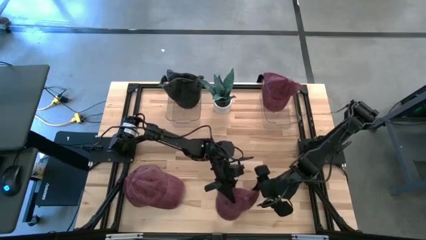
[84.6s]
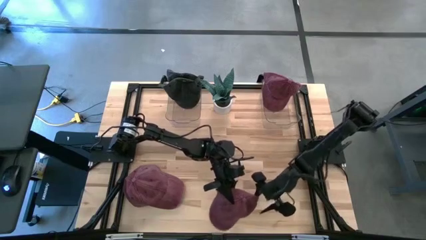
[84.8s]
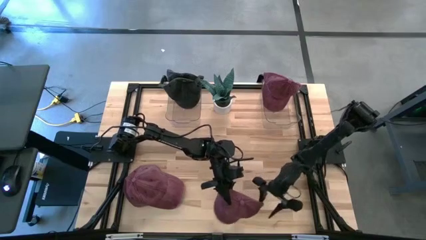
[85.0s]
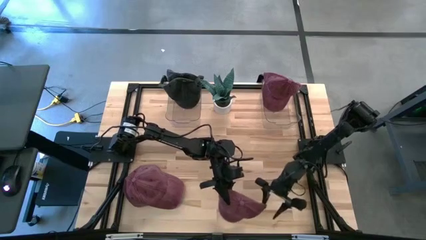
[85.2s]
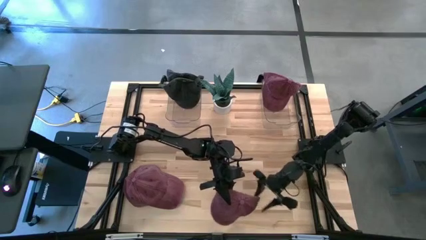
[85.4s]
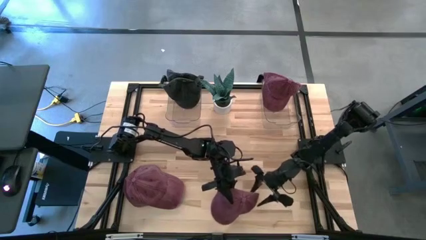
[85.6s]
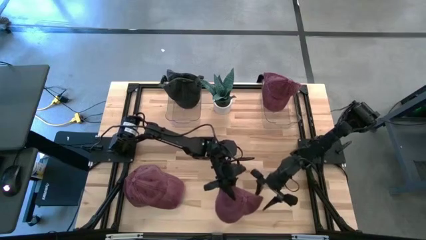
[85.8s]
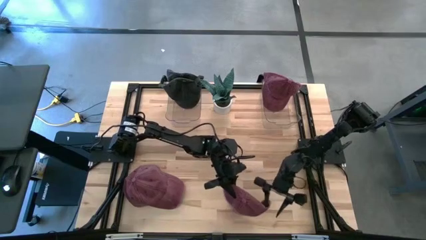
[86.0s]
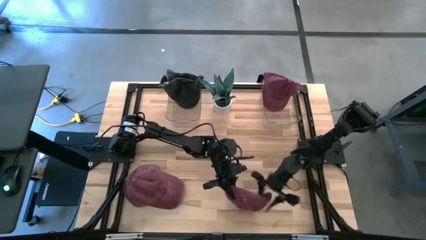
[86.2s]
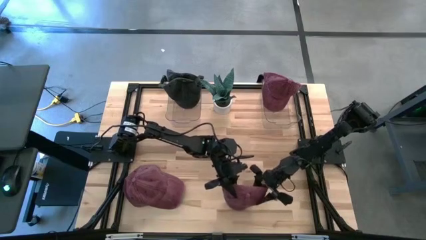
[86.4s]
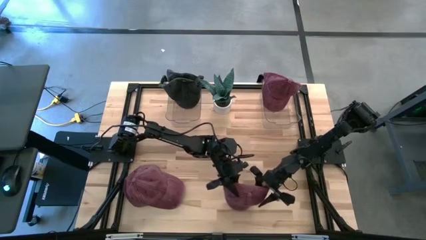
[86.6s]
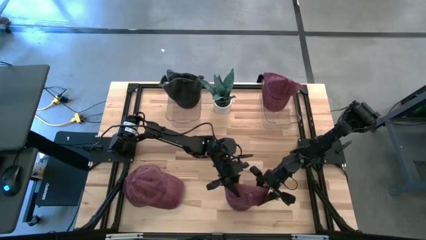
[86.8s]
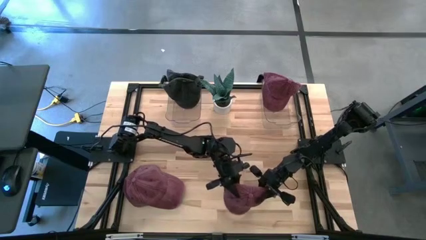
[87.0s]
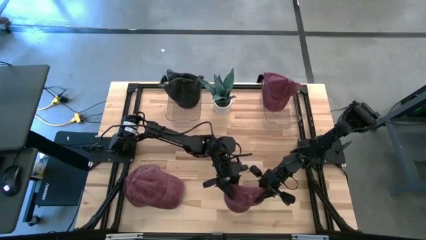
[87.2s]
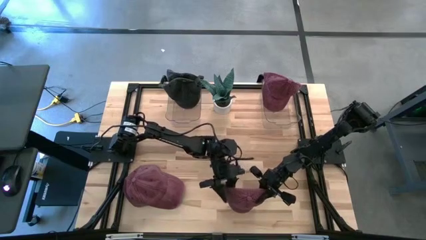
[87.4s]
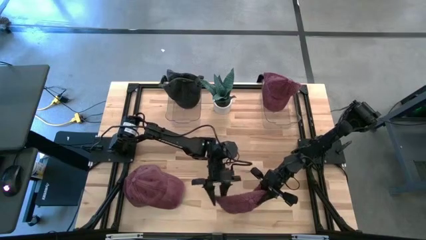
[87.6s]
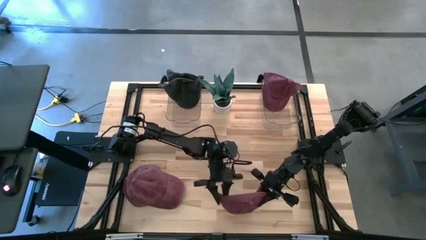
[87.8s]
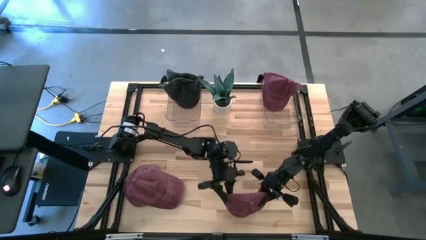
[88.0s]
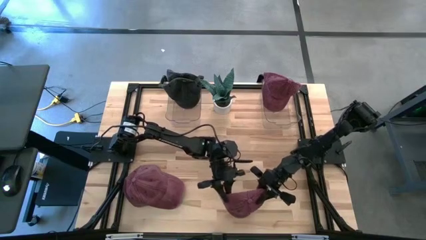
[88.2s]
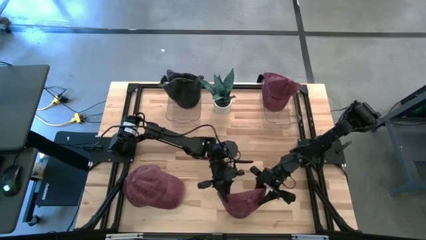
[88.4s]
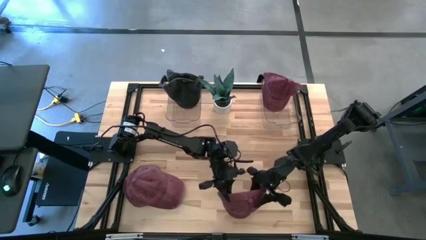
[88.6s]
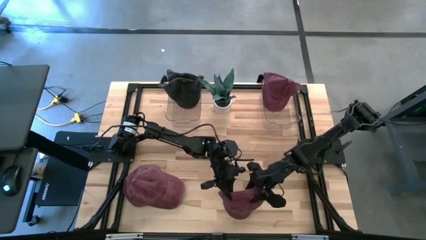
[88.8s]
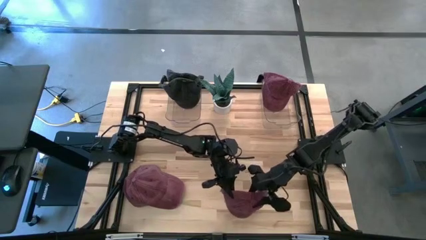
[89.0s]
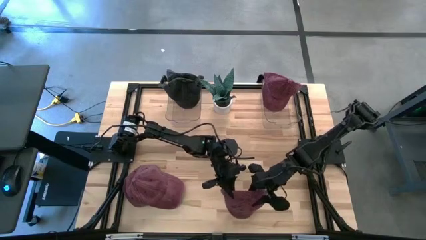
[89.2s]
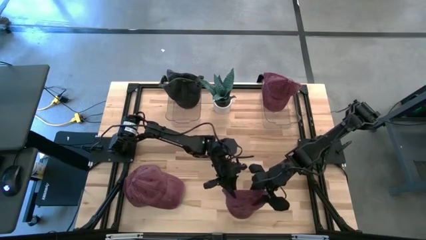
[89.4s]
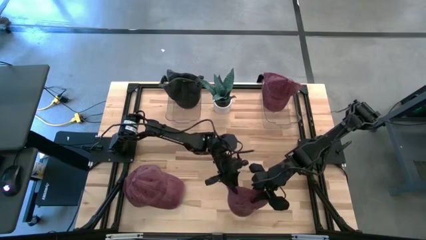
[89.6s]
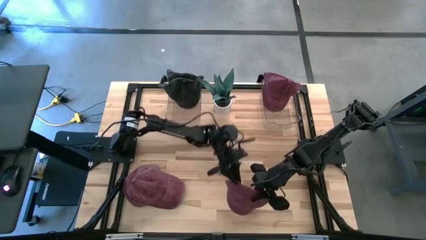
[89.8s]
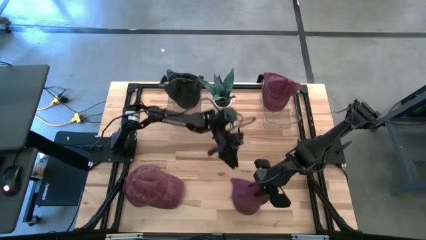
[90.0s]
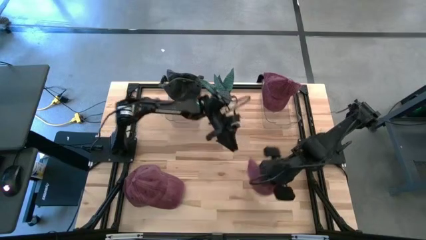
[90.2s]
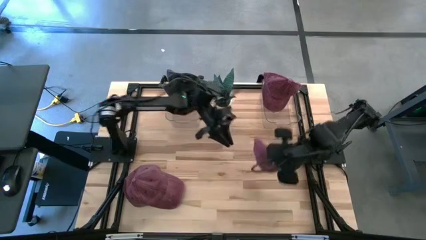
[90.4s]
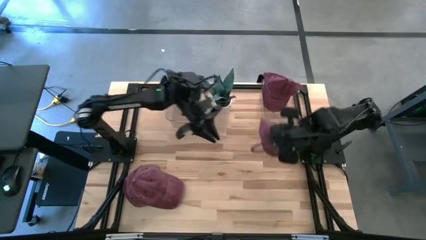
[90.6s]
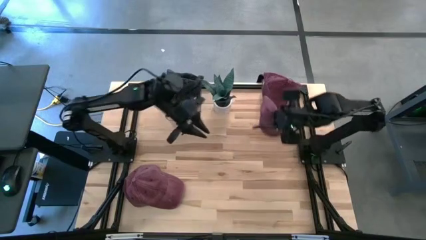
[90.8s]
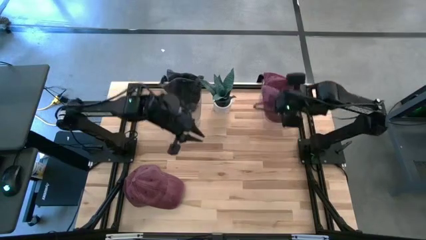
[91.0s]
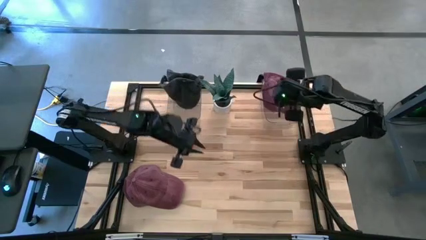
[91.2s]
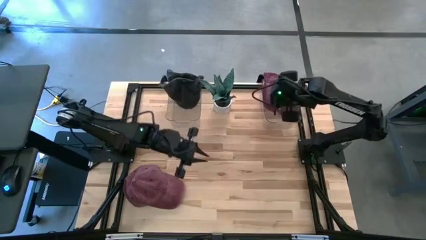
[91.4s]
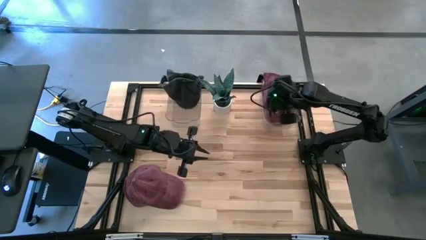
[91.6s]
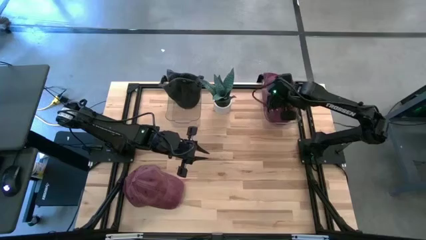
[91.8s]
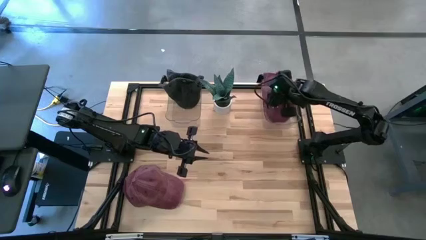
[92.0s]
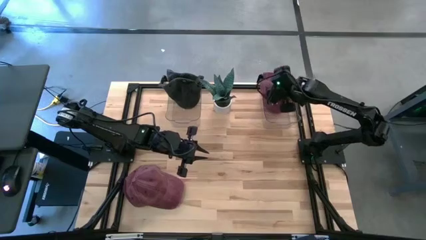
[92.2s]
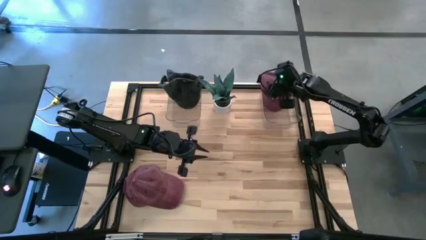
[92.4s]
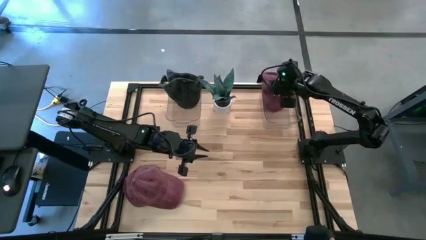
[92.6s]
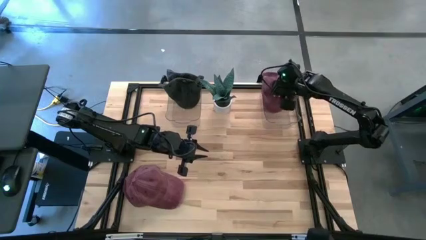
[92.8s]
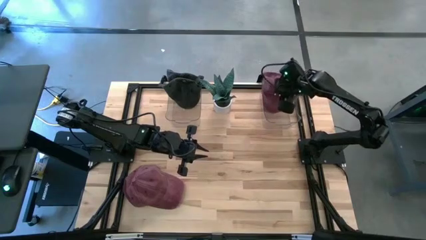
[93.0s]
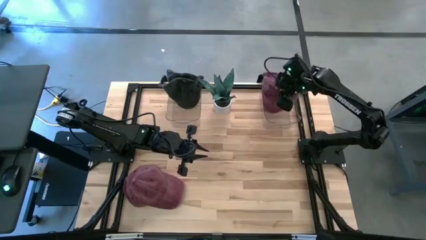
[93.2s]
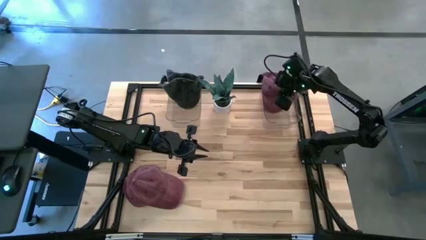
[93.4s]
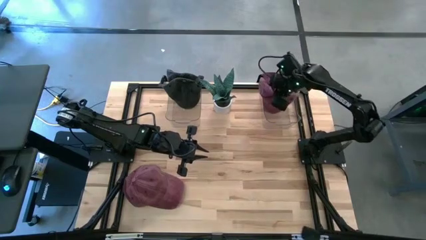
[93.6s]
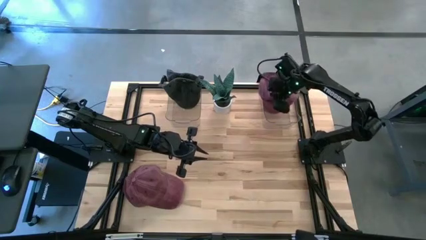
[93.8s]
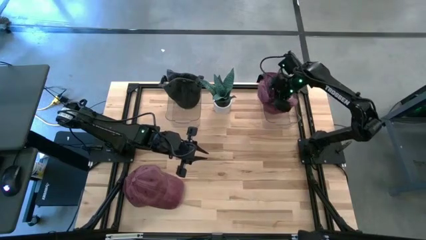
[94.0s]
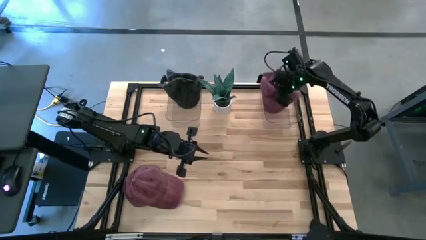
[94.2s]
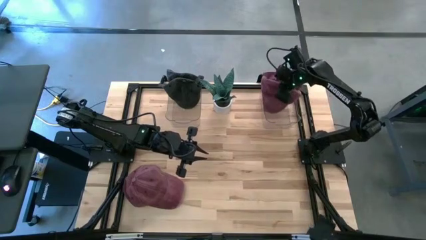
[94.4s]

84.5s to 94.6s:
Task: Pick & Place hat
Put the top red cap into the right transparent bin

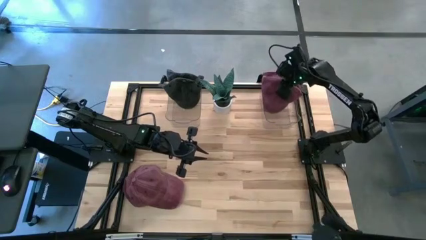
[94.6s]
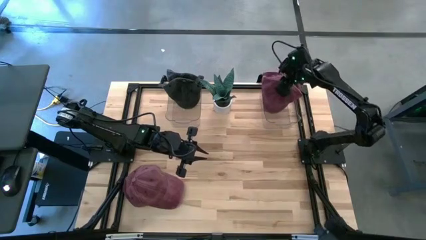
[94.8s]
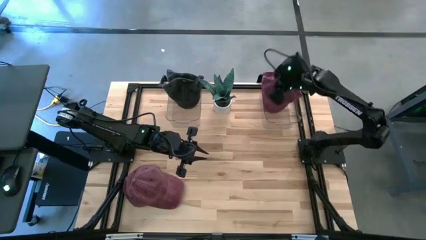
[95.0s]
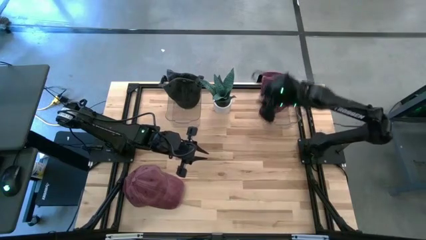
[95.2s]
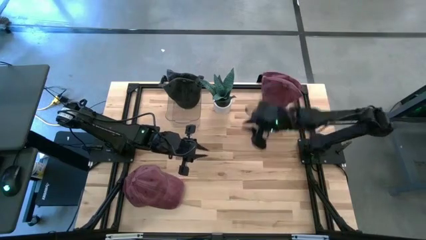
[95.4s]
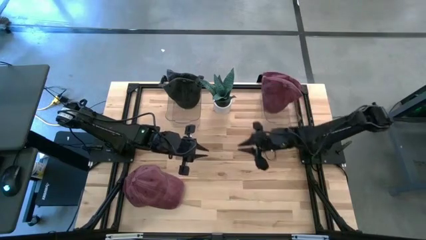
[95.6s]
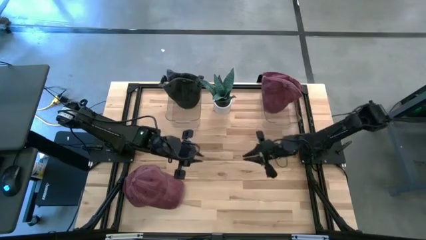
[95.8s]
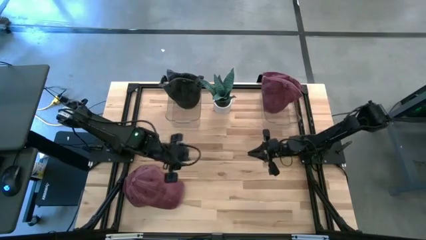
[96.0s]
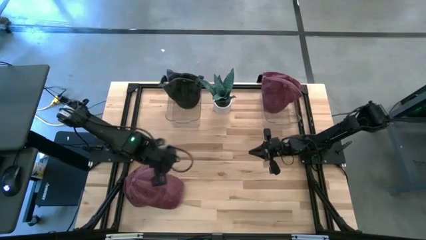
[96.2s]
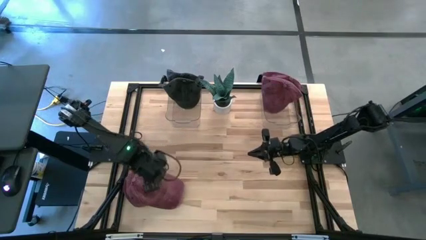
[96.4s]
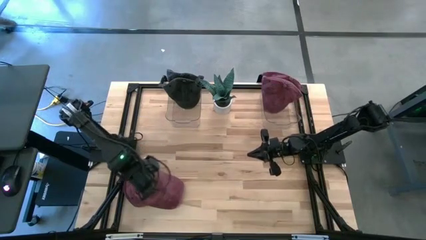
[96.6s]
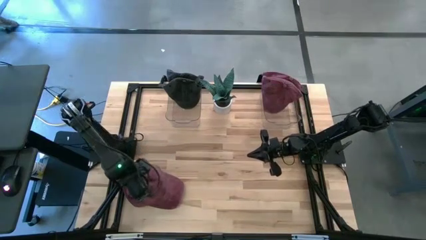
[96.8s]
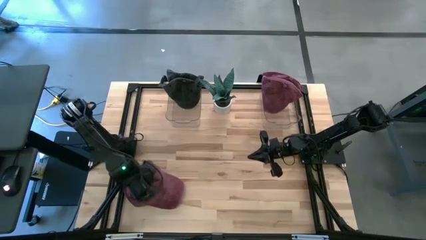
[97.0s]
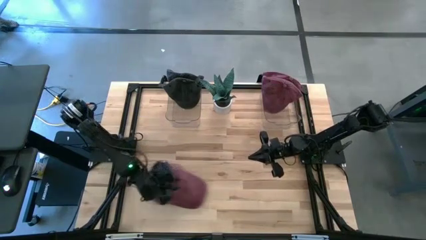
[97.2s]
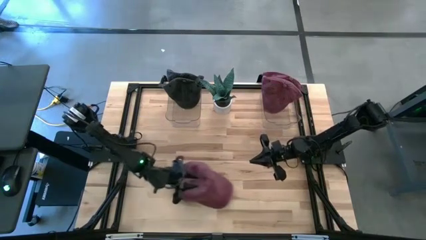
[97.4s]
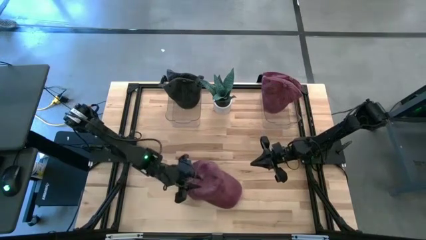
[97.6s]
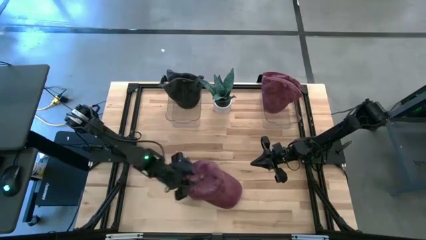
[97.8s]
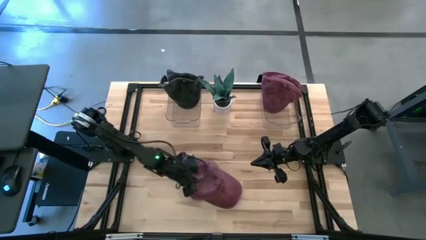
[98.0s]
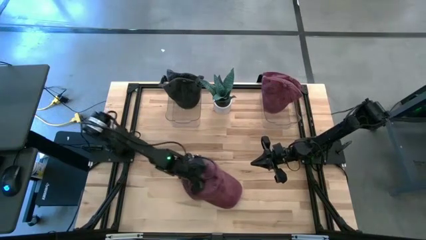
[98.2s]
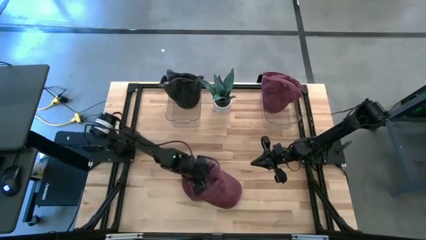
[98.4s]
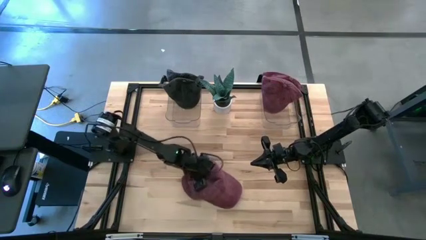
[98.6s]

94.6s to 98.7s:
Put the red cap into the right transparent bin

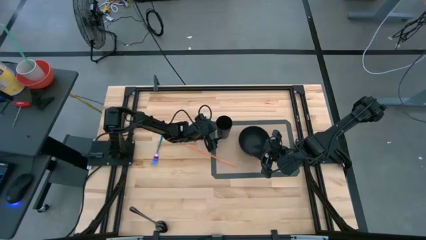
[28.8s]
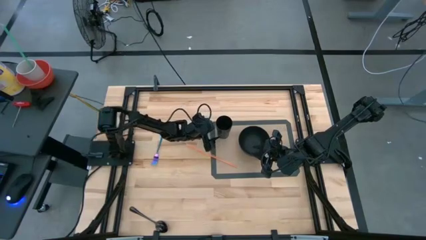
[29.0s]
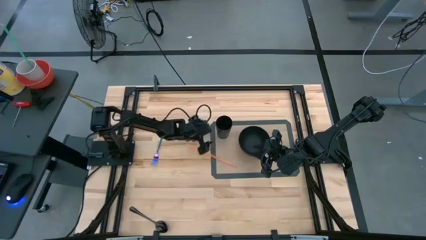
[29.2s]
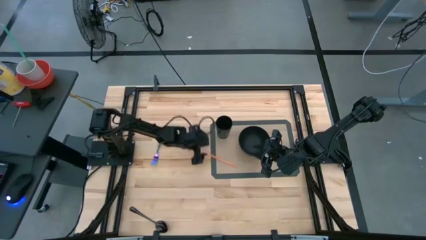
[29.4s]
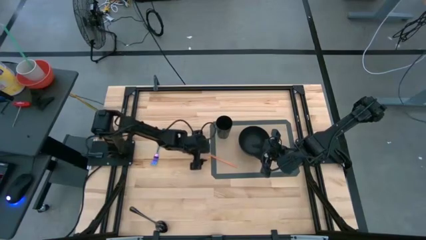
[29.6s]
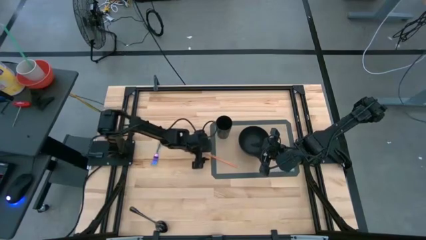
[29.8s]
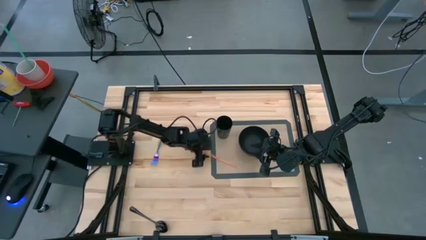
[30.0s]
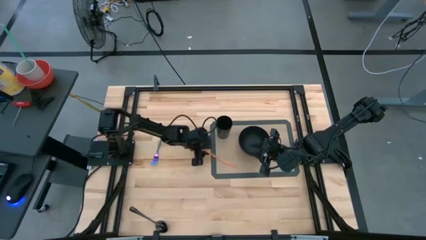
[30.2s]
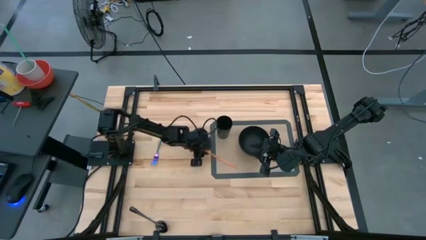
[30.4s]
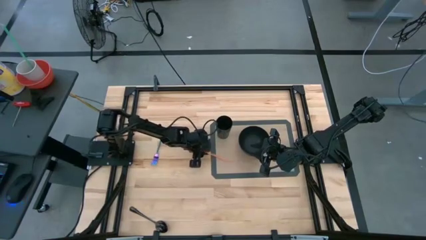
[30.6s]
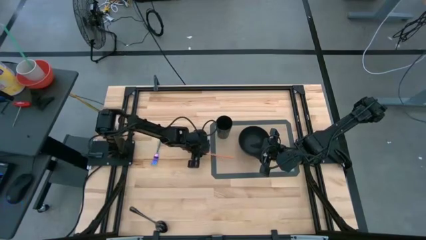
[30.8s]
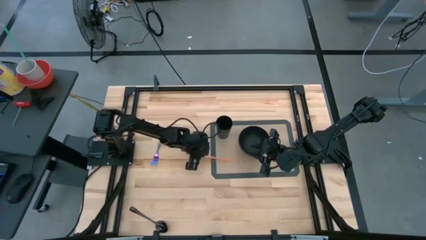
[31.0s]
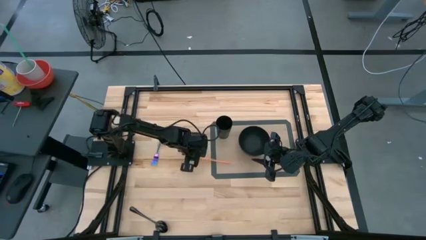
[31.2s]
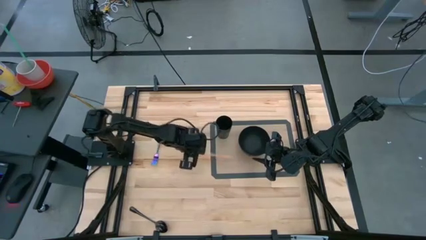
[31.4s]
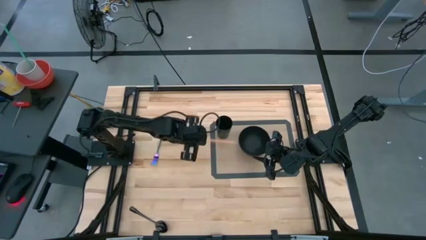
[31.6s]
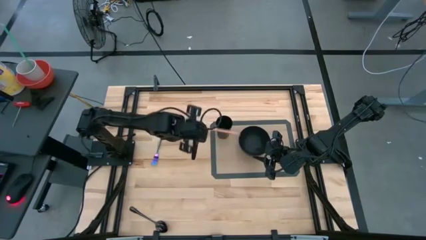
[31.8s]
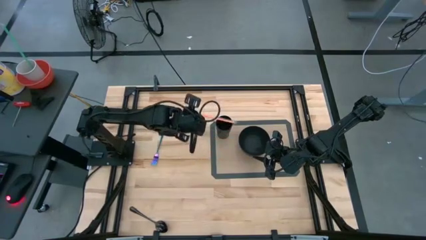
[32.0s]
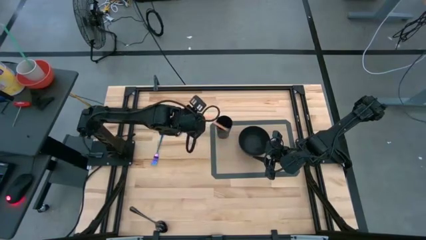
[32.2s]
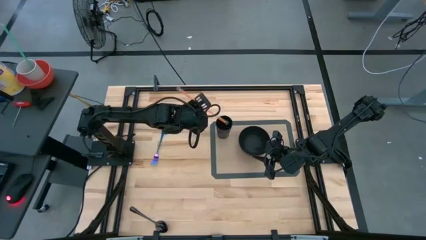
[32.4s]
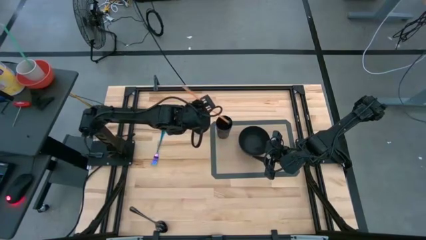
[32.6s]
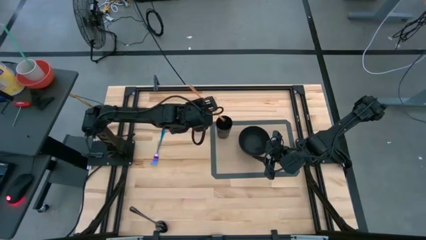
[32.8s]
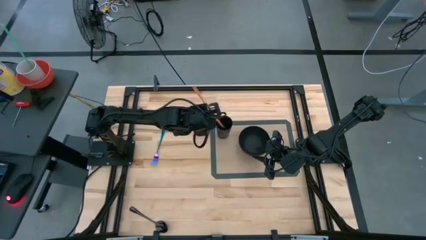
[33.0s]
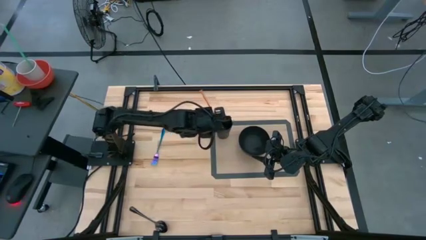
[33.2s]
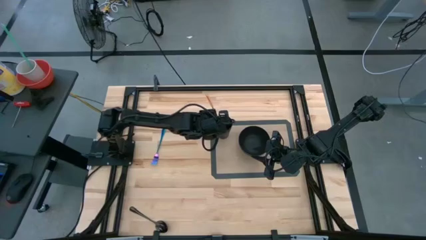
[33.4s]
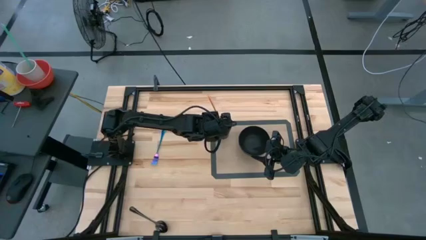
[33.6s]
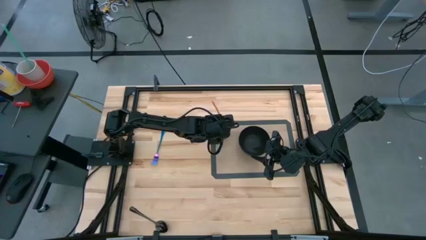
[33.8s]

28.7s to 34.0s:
Task: Pick & Place Utensil
Put the orange straw into the black cup
